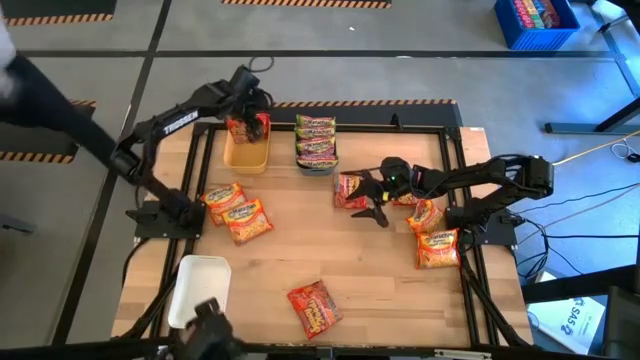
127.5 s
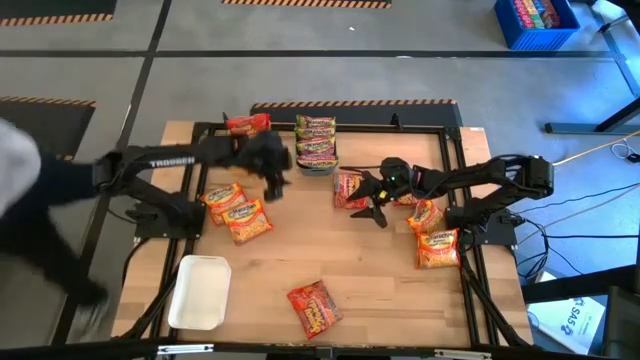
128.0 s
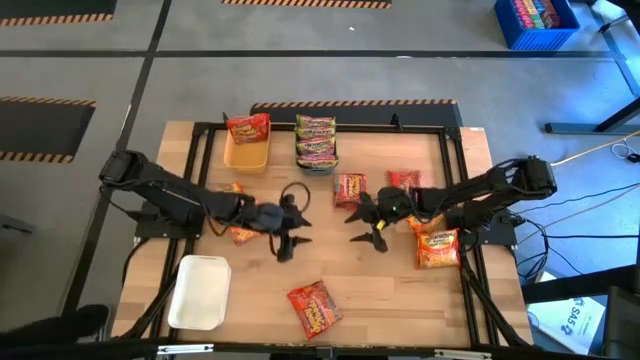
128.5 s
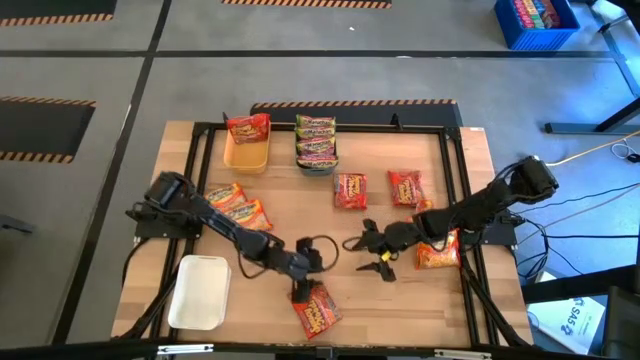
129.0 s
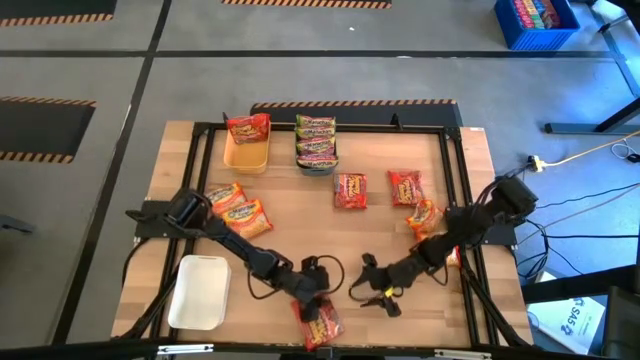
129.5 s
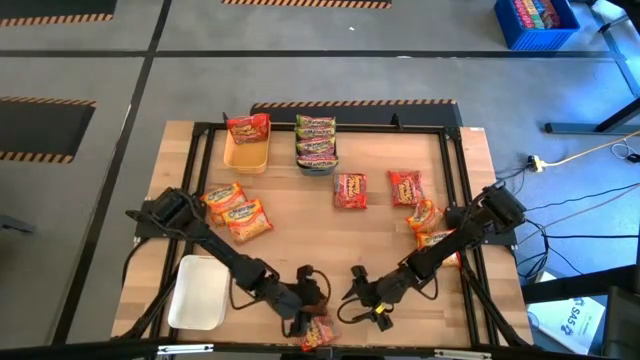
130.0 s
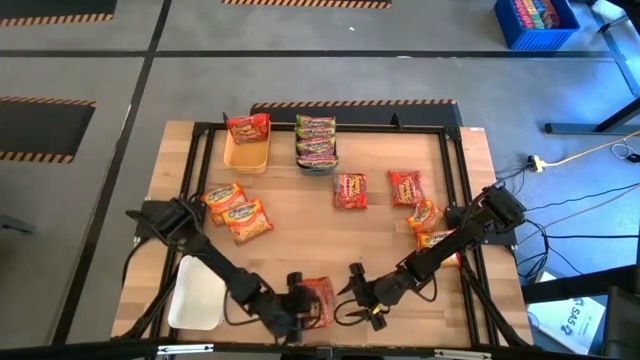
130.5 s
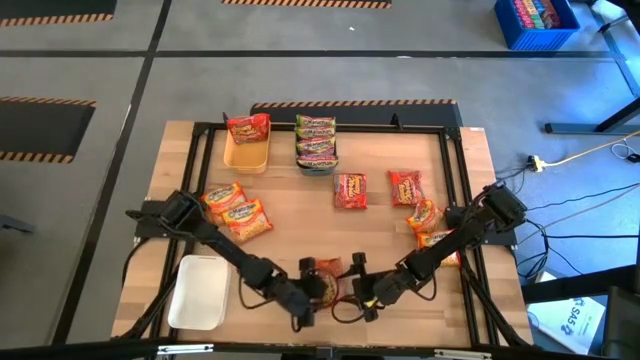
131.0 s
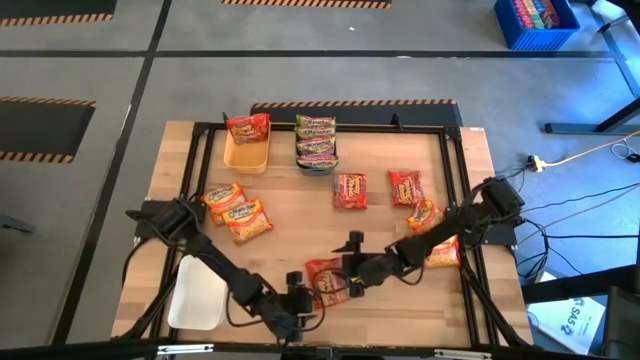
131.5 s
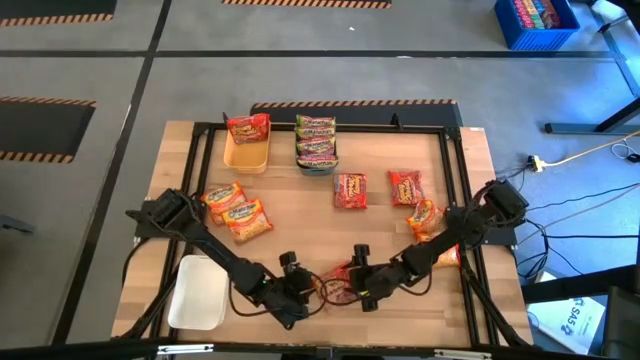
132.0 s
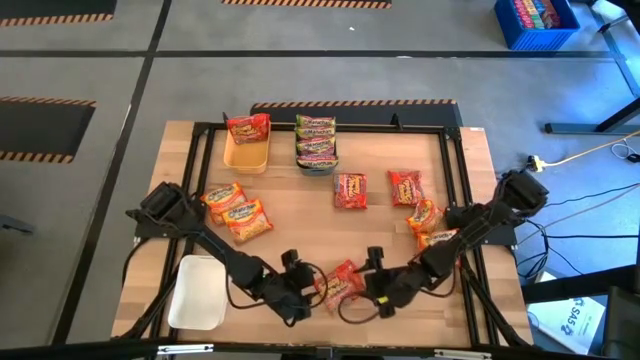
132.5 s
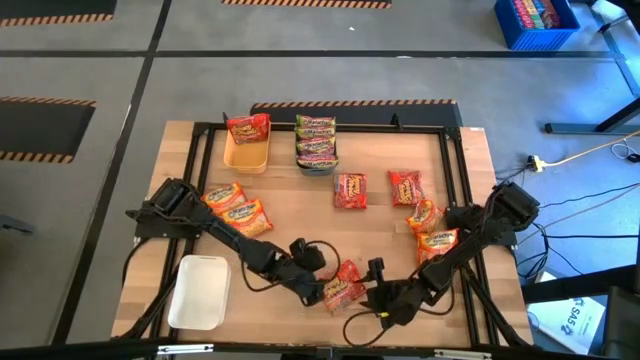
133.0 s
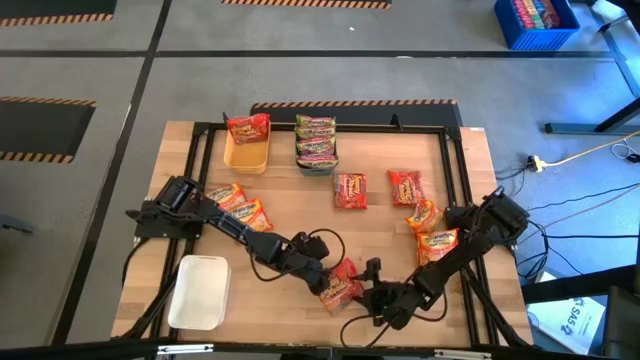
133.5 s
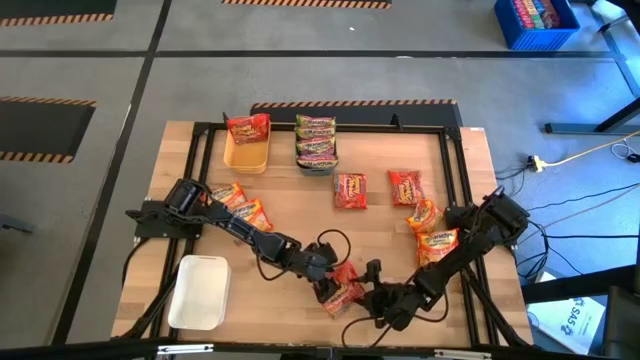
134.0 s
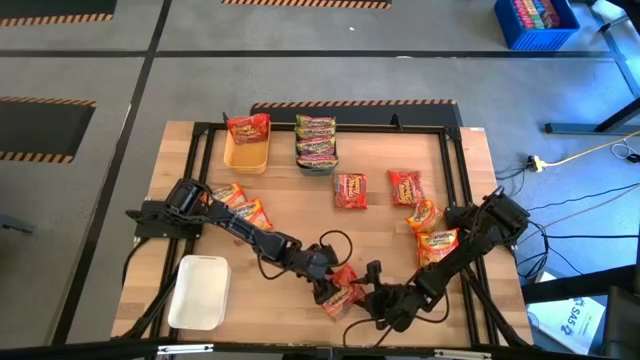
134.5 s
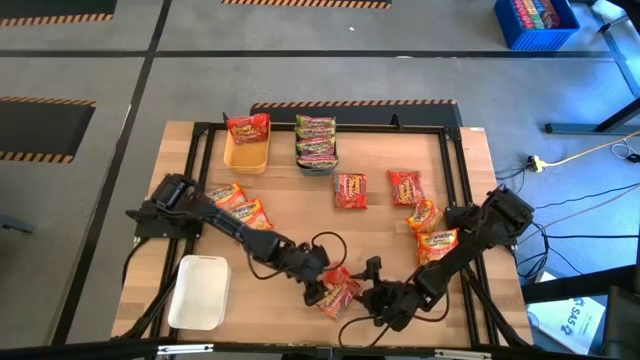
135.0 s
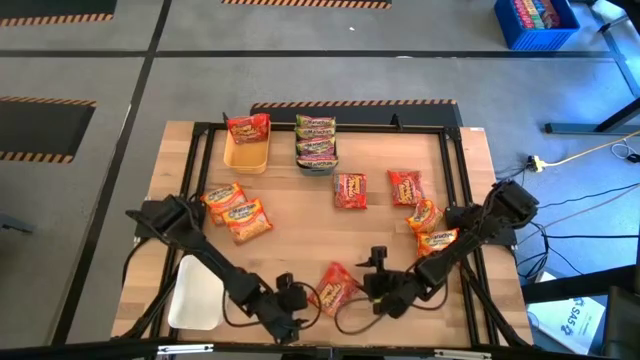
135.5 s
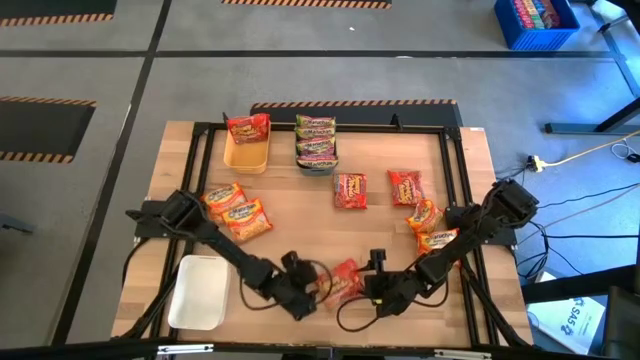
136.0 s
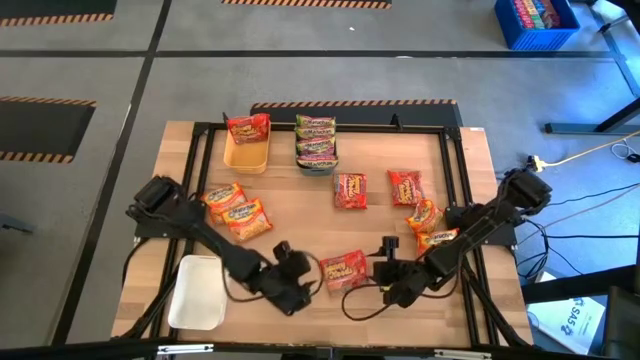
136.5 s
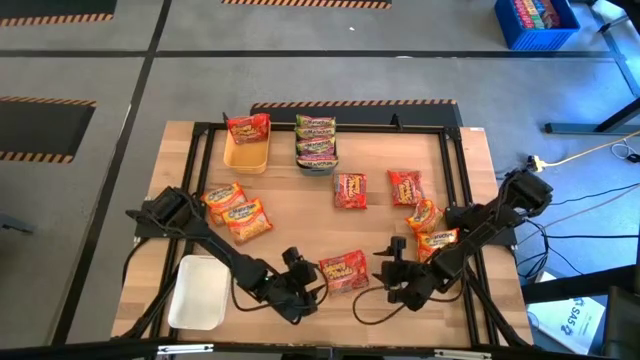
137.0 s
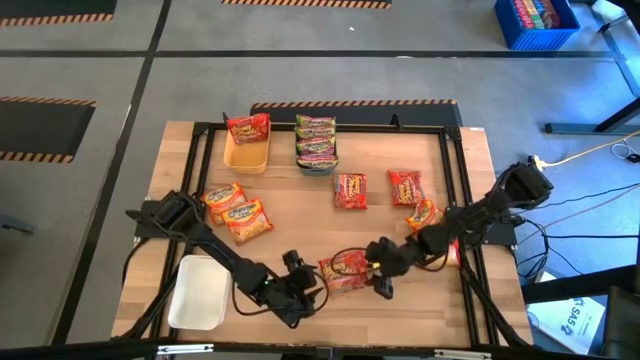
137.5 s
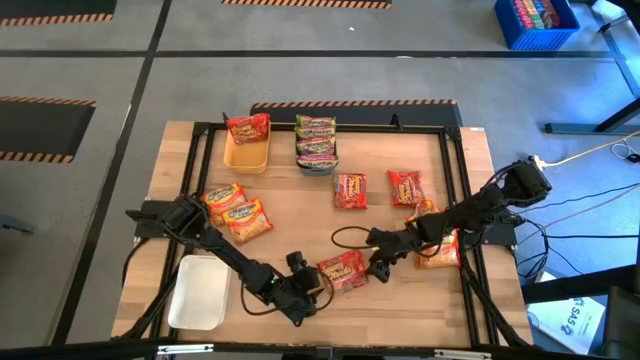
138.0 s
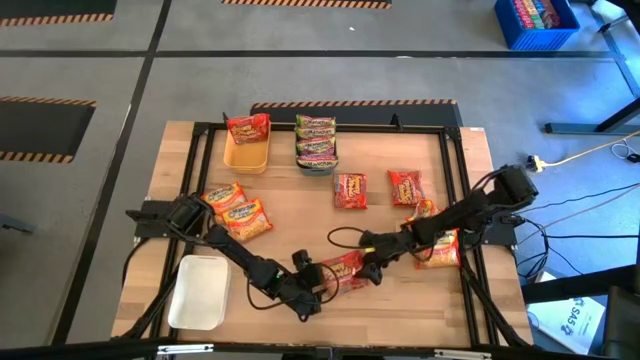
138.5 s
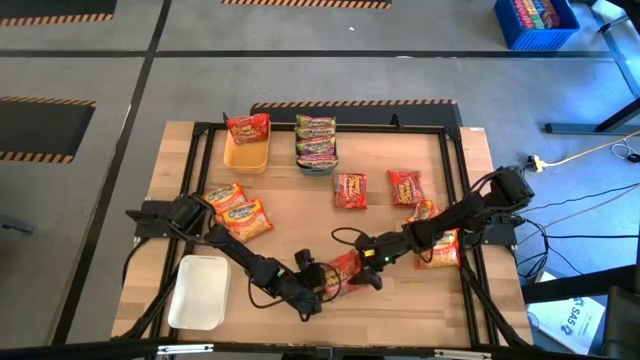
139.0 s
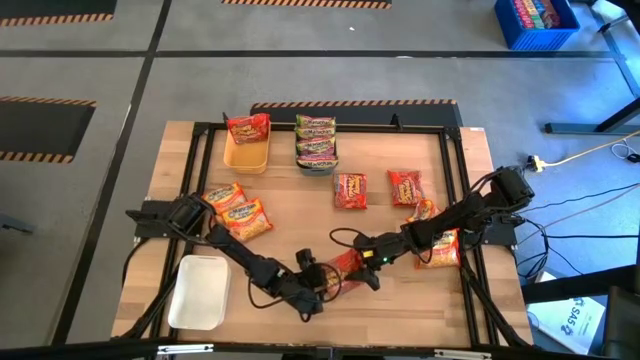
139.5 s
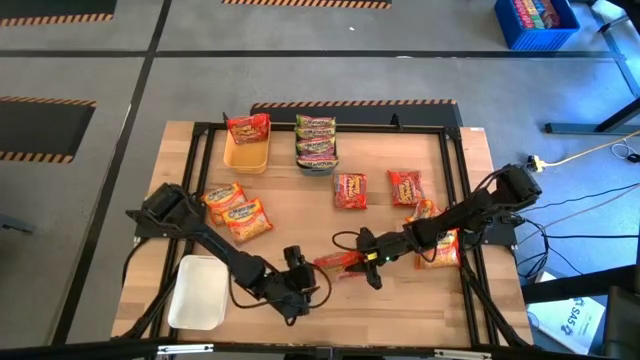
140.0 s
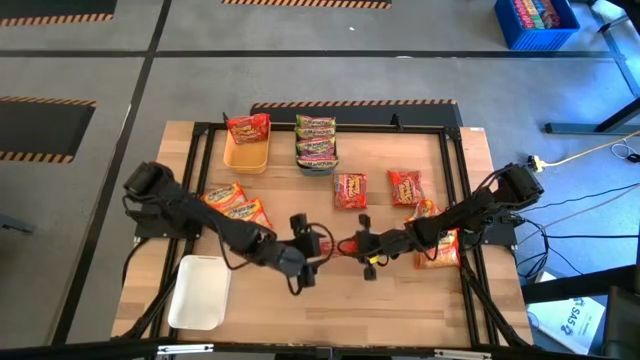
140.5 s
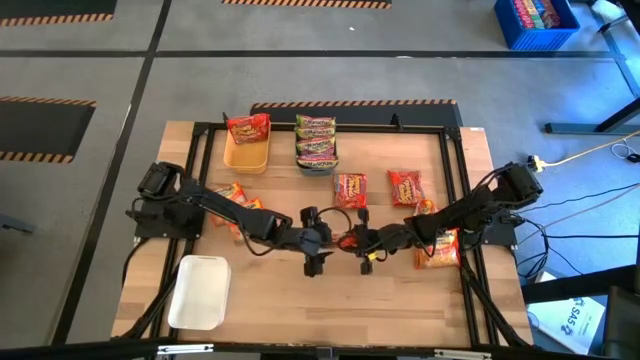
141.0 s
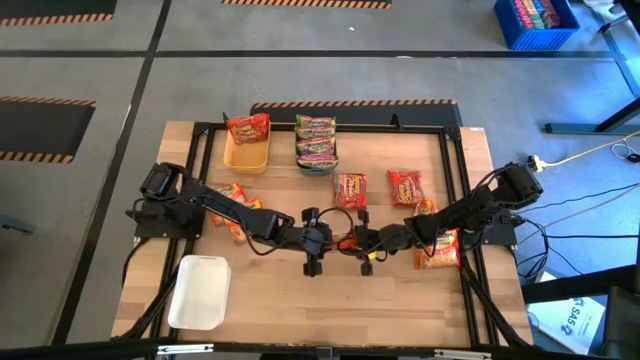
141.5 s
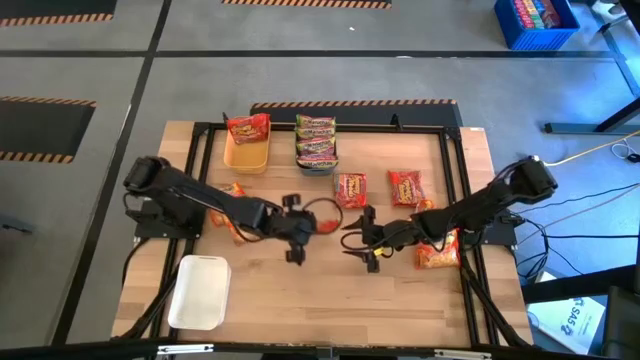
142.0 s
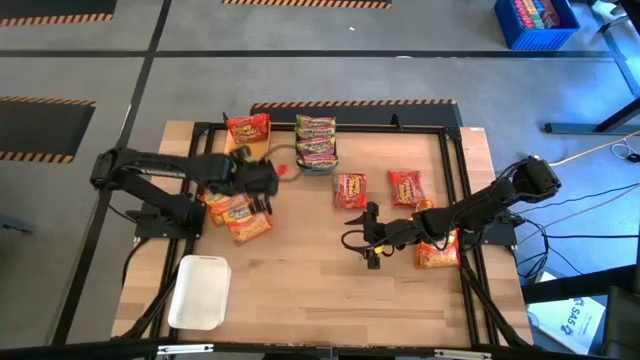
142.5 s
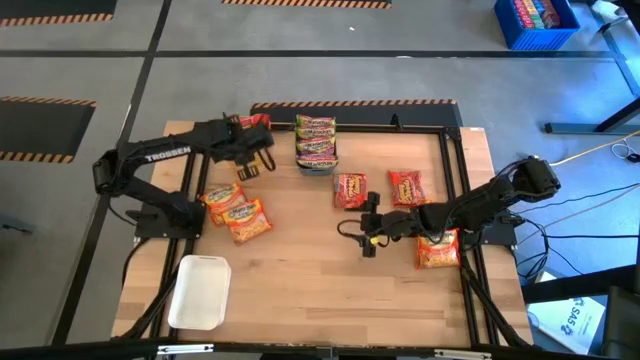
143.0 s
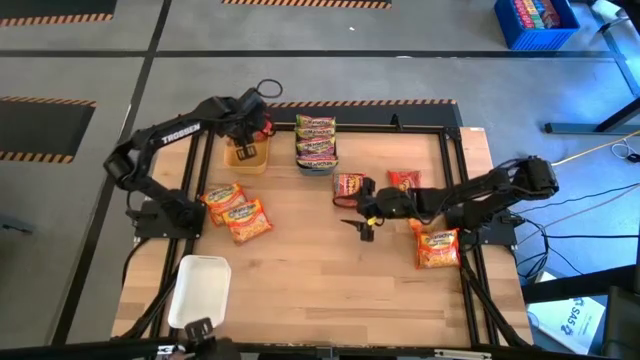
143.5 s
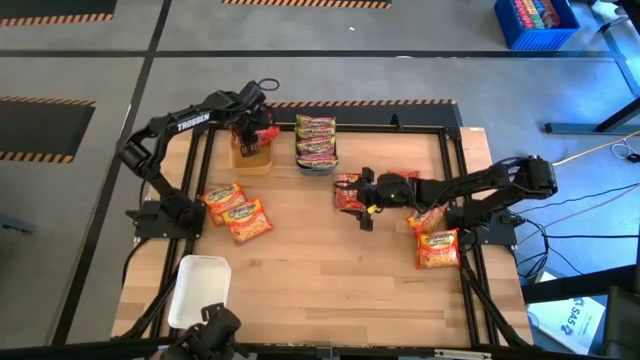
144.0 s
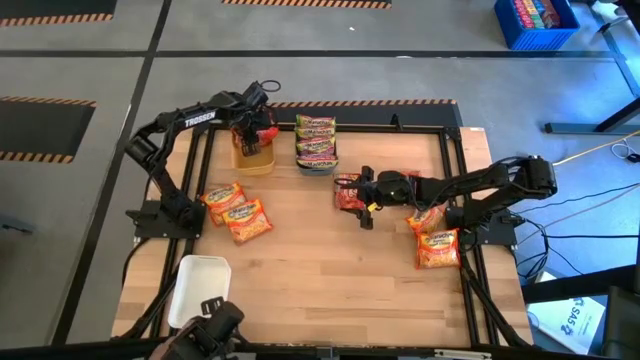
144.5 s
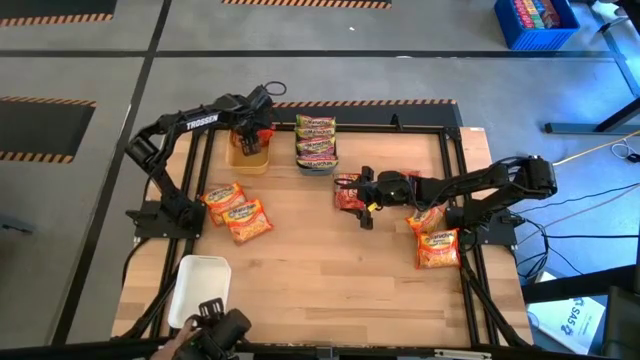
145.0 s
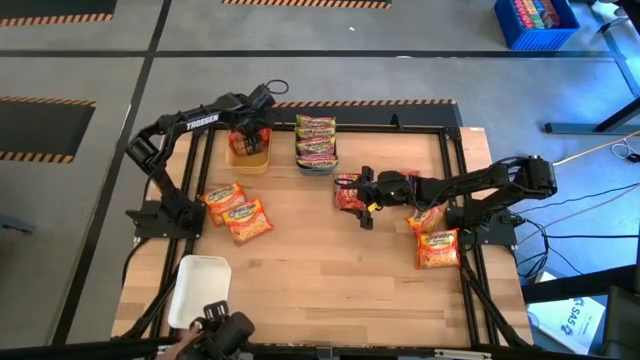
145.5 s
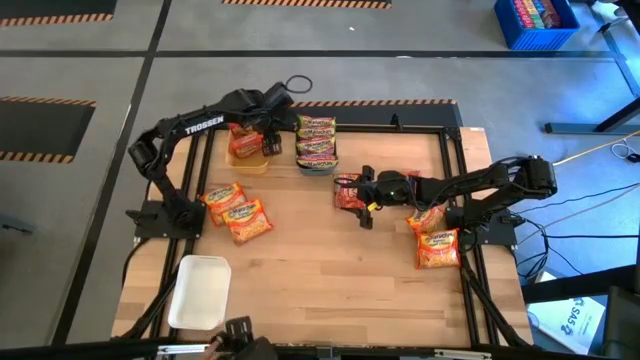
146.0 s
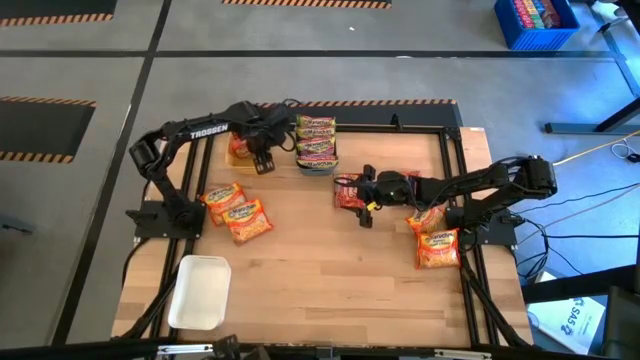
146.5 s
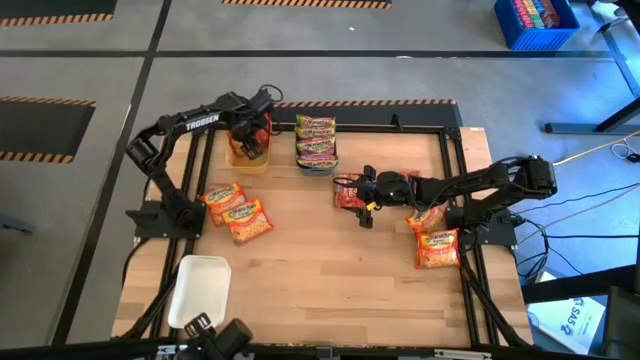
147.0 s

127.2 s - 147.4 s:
Task: Sort Maruchan noodles
Put the orange noodle pack into the yellow bin
